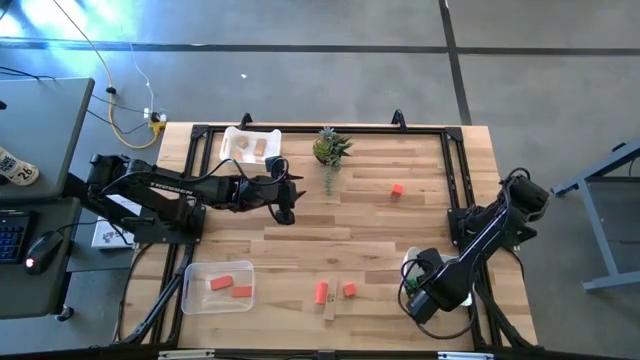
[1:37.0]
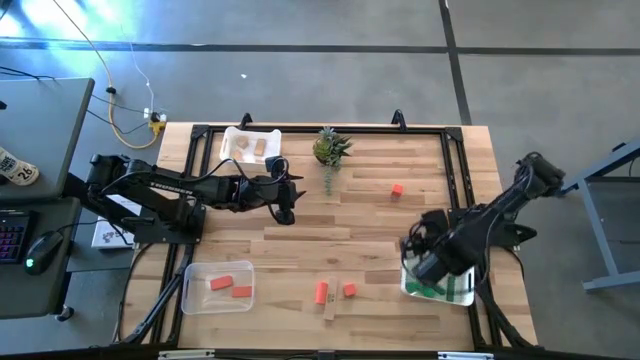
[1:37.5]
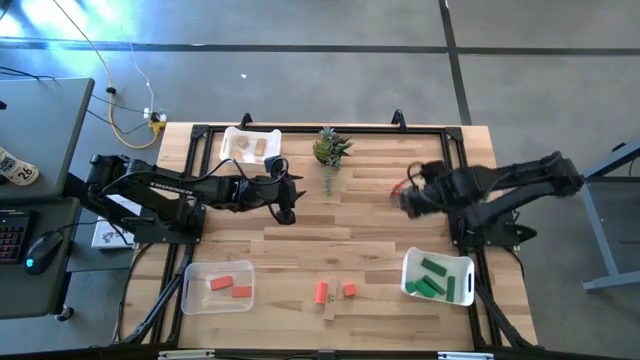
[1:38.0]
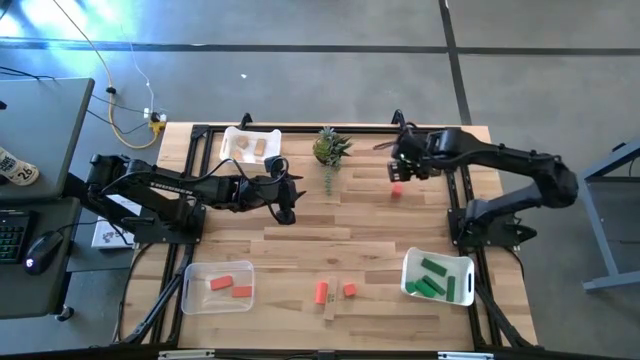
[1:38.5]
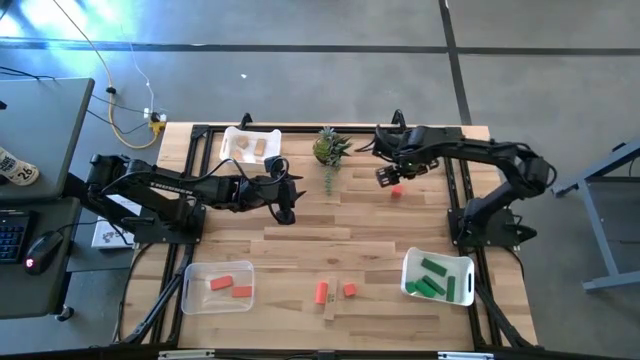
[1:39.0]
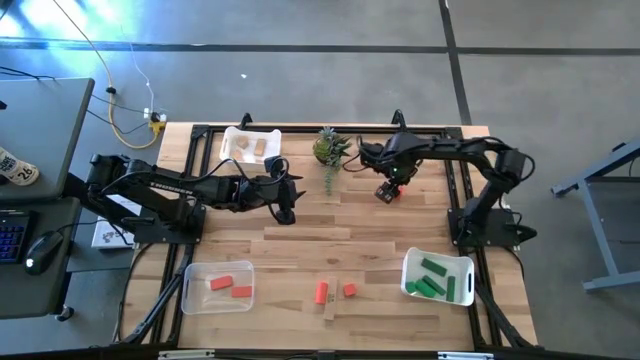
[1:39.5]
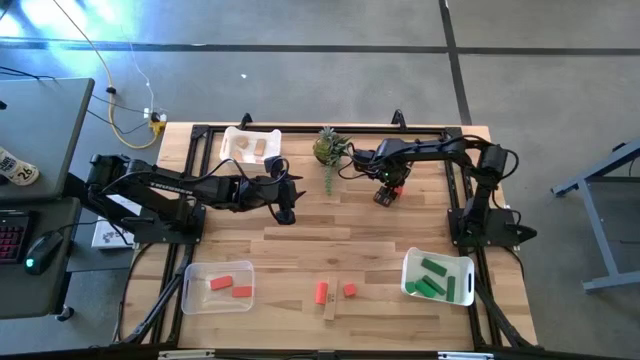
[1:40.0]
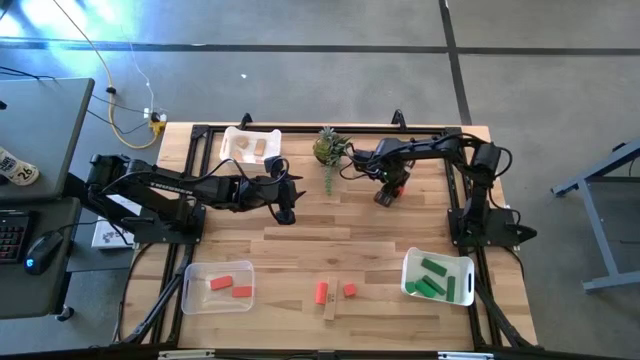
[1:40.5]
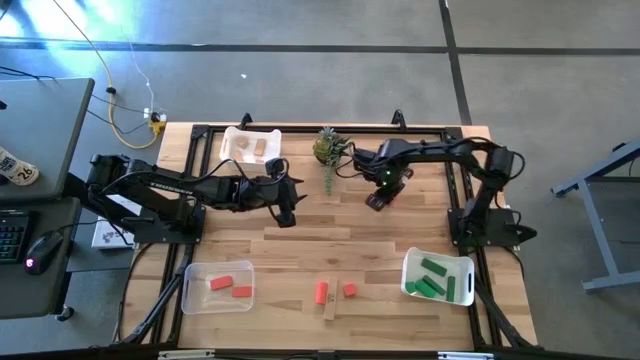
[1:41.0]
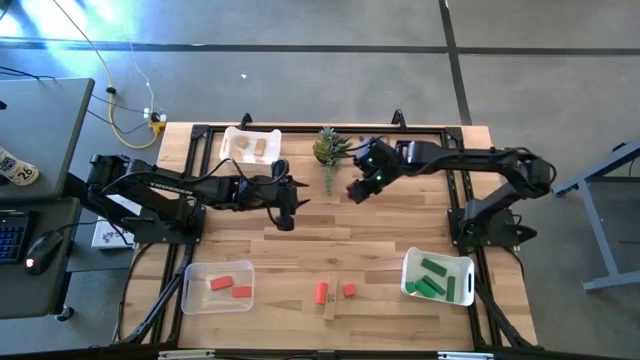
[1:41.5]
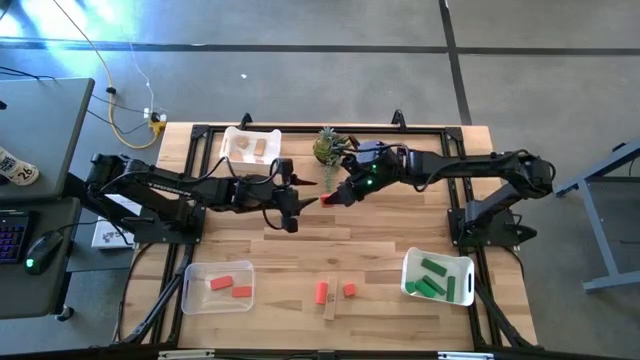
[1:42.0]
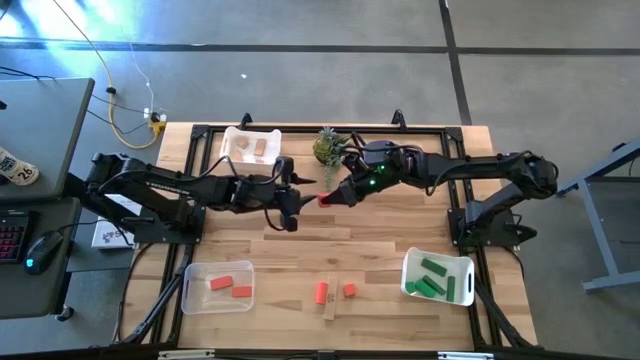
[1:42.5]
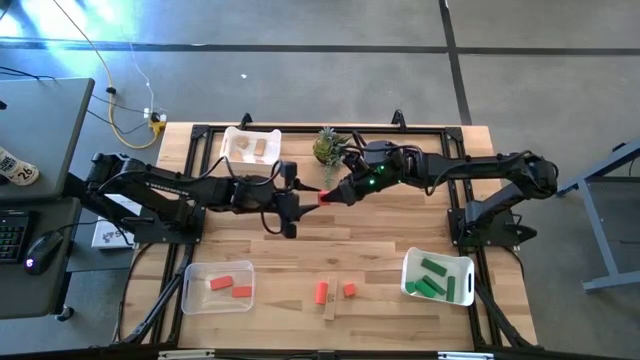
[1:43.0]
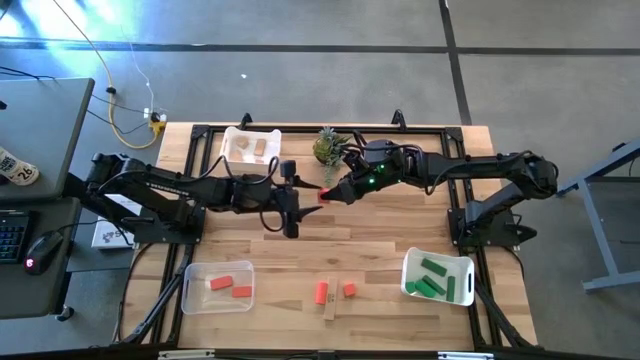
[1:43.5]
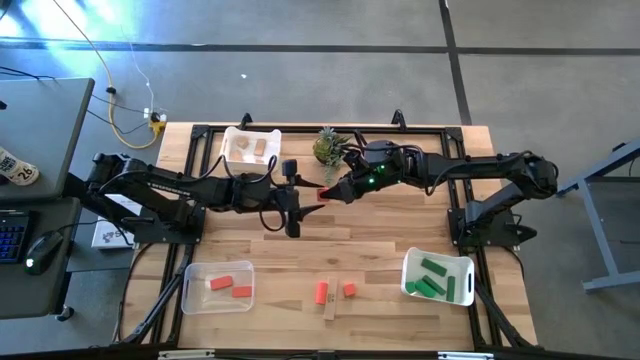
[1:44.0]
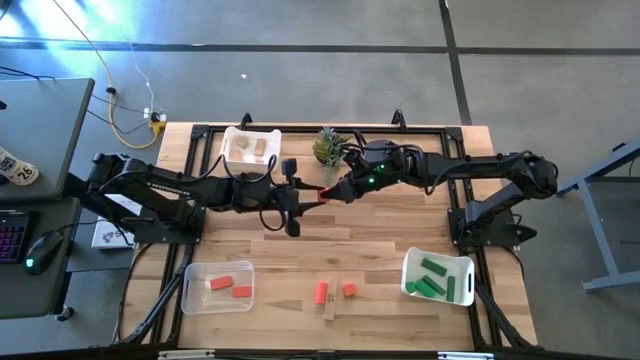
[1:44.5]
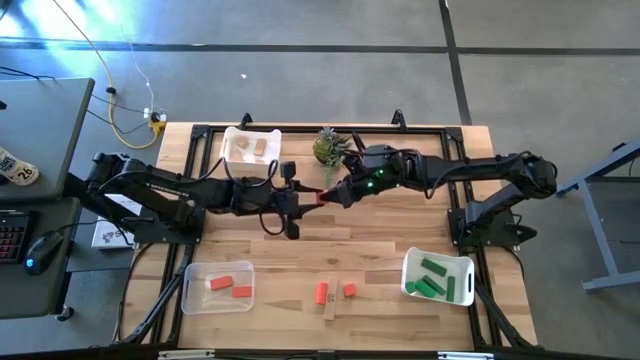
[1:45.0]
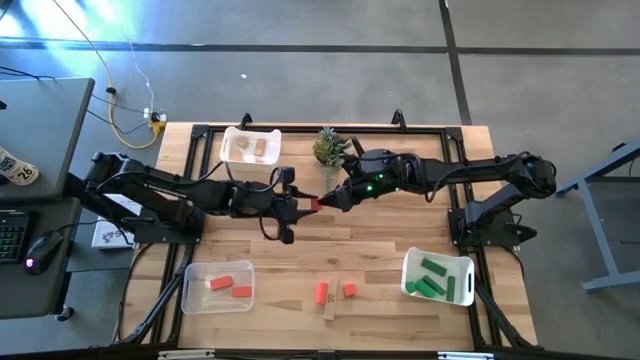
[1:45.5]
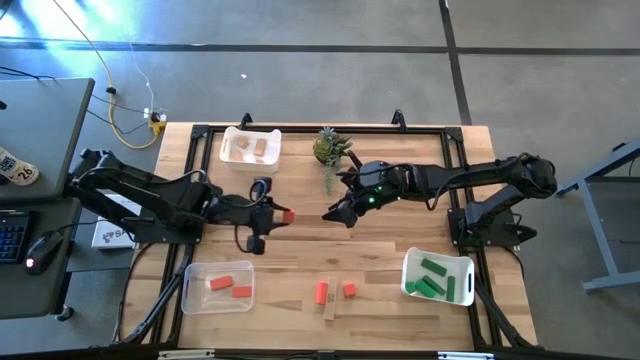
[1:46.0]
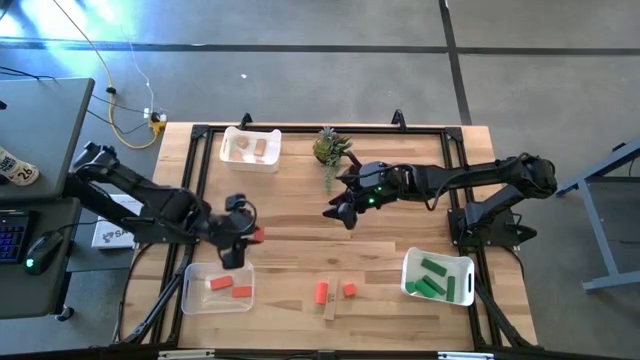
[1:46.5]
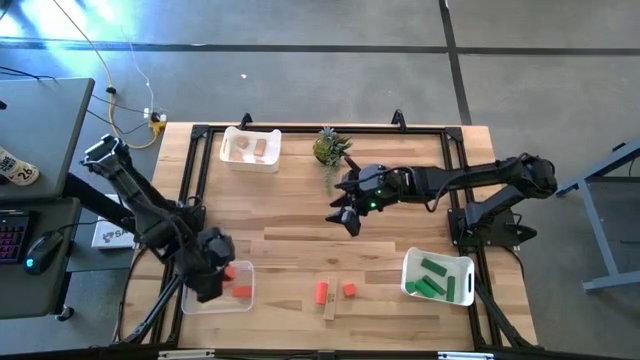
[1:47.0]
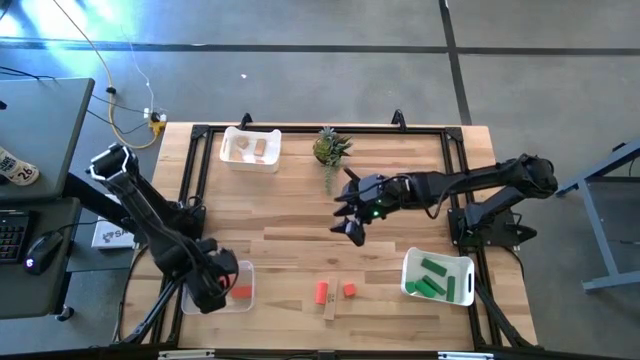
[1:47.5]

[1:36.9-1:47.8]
Task: Sort & place blocks by color
Put the orange block into the transparent bin

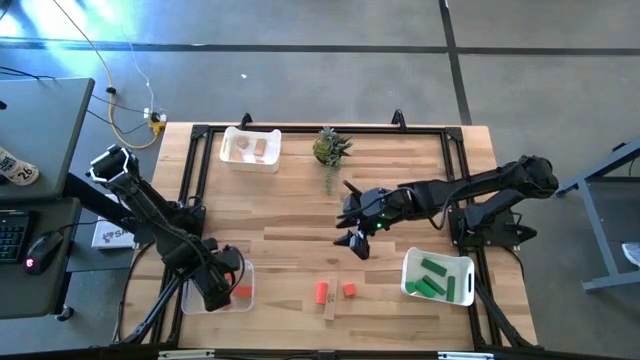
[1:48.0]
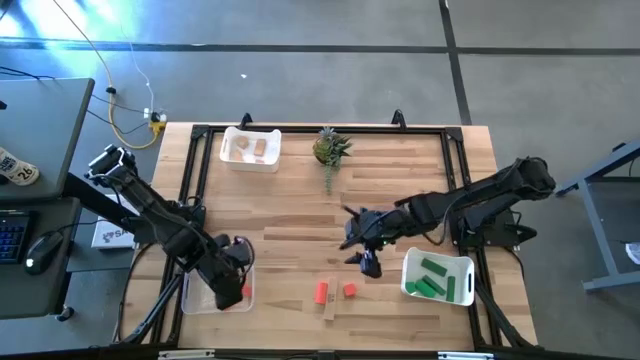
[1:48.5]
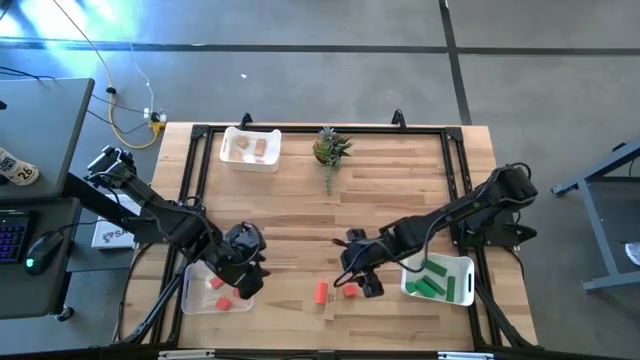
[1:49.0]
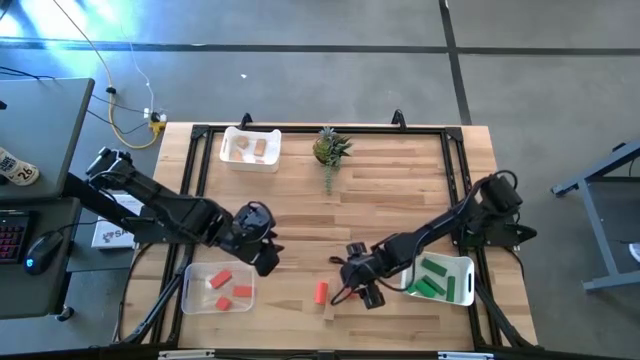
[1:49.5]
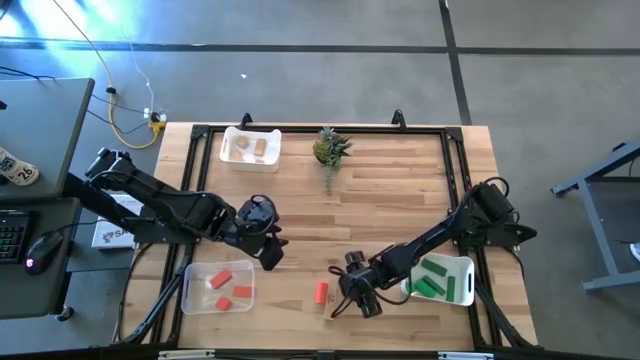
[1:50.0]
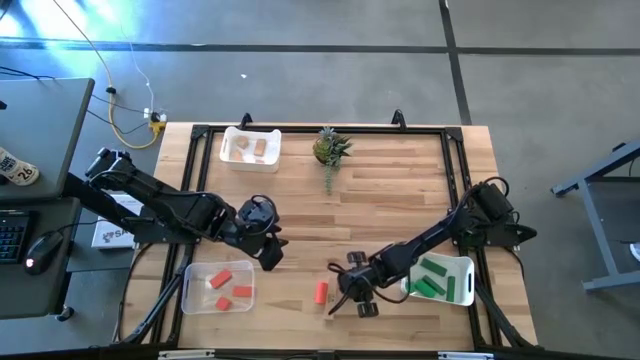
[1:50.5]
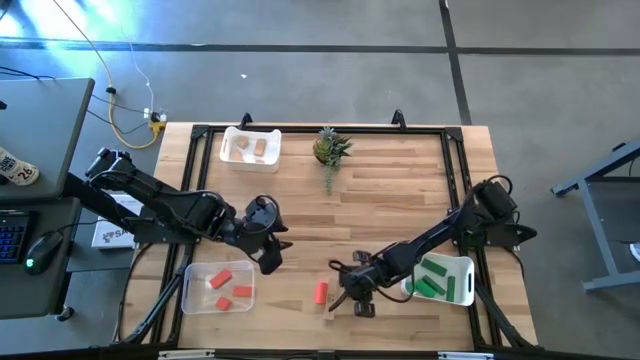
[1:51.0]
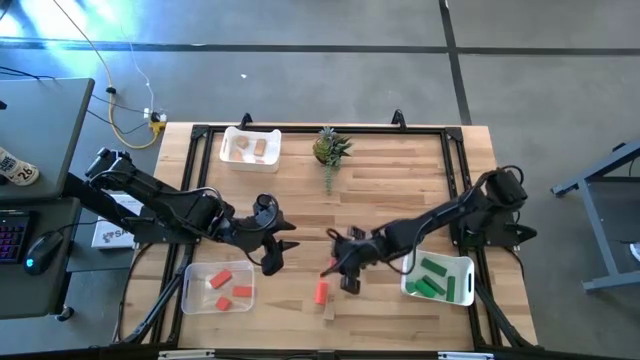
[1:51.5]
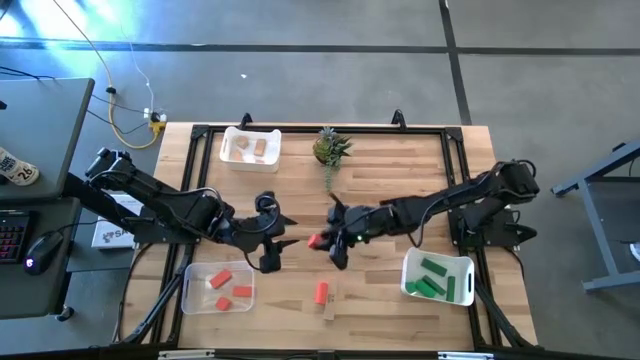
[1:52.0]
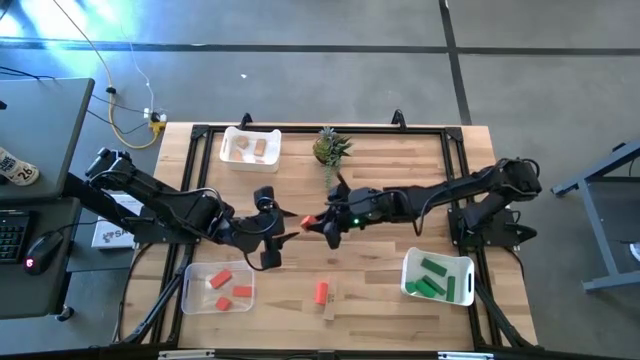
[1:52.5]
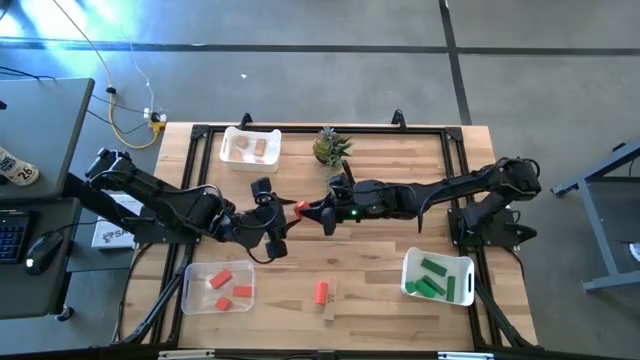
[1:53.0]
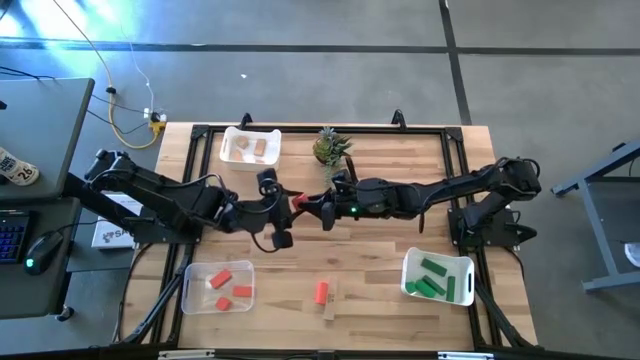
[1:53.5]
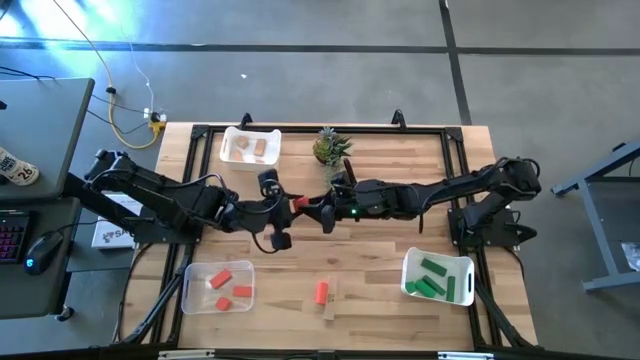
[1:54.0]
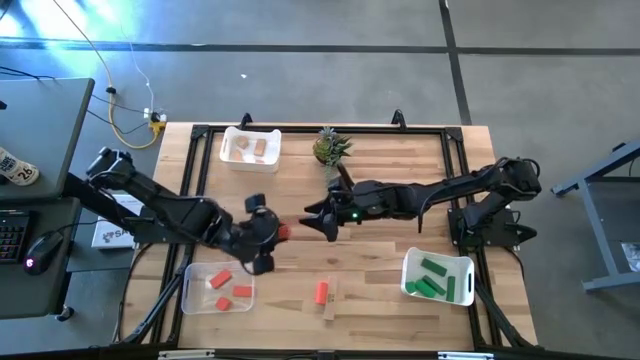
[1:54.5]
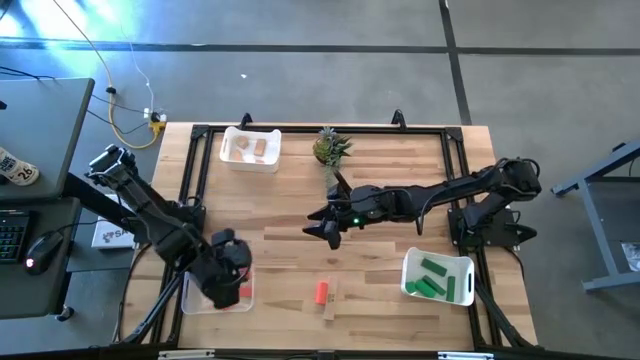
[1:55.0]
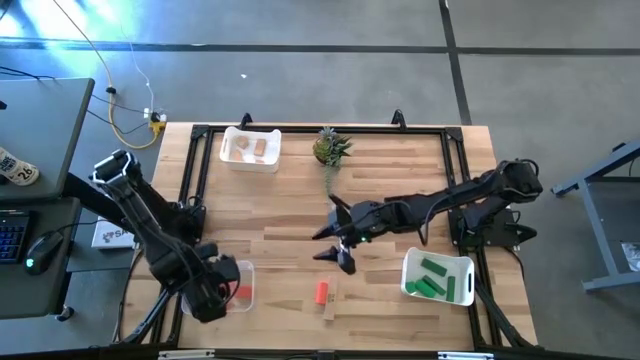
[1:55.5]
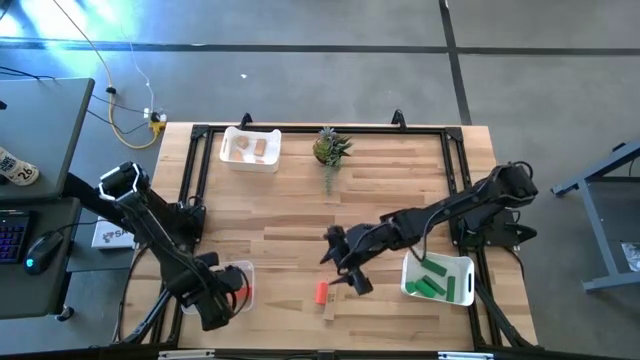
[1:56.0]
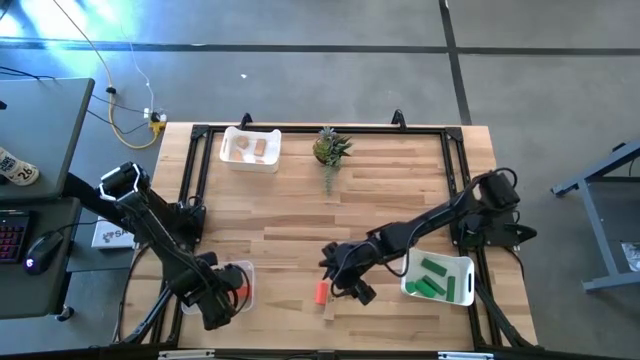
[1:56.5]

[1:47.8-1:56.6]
Put the orange block into the transparent bin
